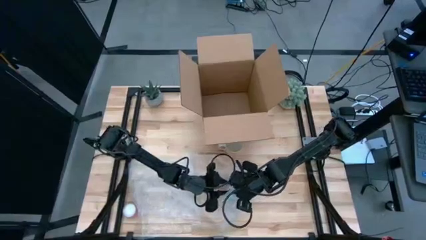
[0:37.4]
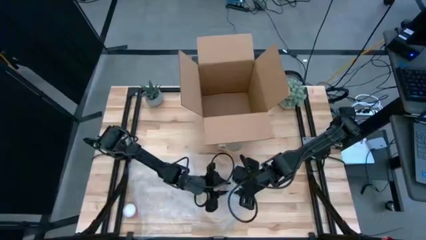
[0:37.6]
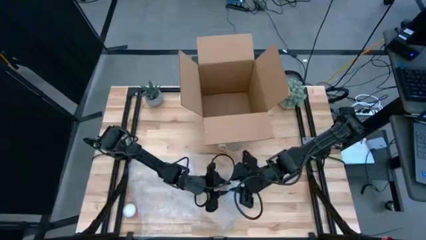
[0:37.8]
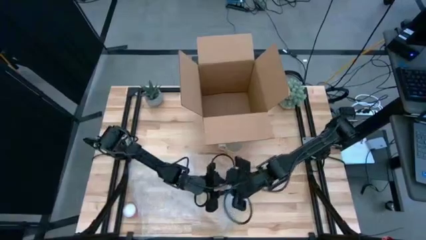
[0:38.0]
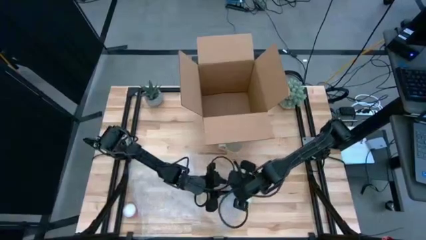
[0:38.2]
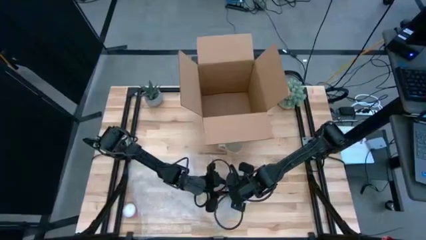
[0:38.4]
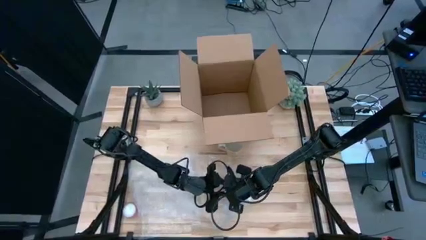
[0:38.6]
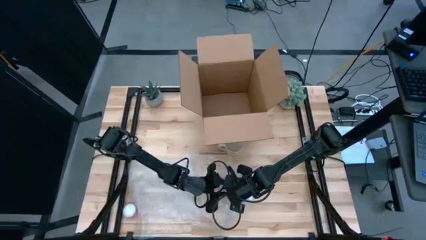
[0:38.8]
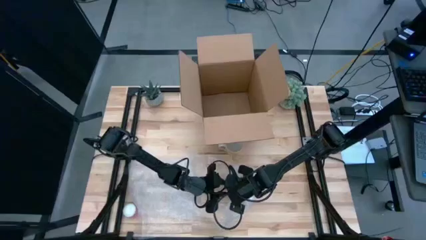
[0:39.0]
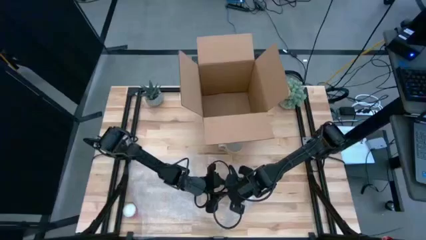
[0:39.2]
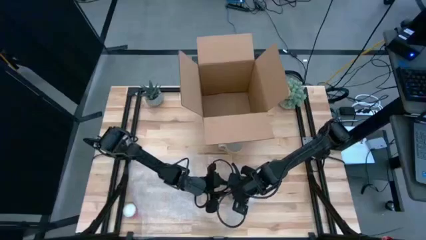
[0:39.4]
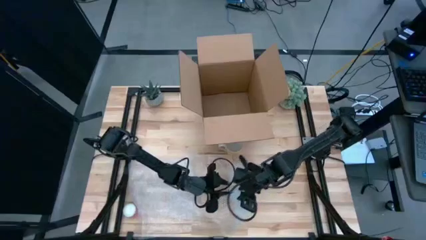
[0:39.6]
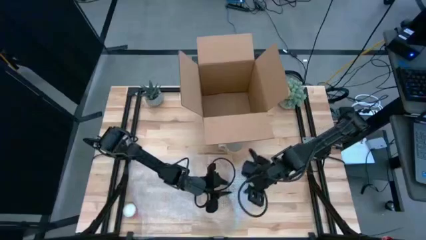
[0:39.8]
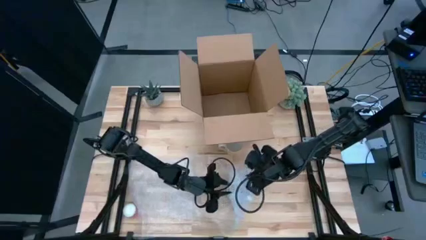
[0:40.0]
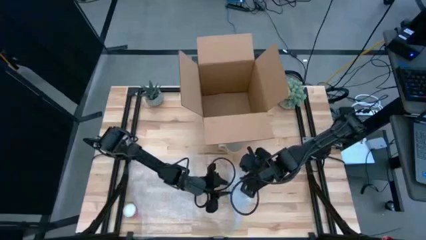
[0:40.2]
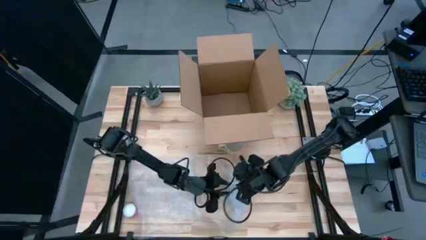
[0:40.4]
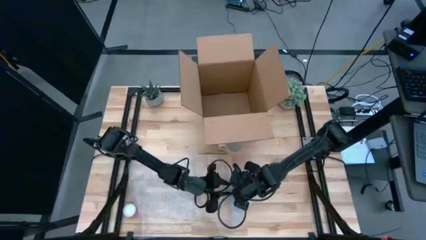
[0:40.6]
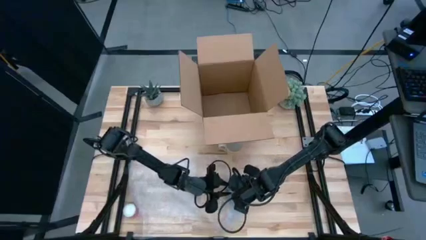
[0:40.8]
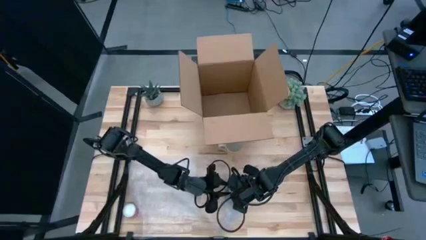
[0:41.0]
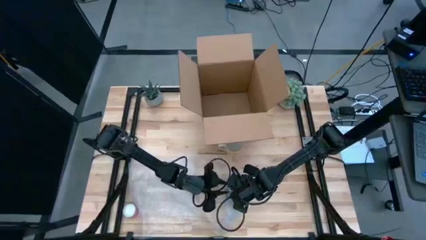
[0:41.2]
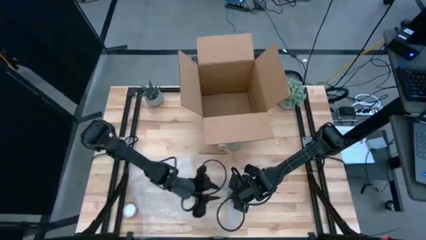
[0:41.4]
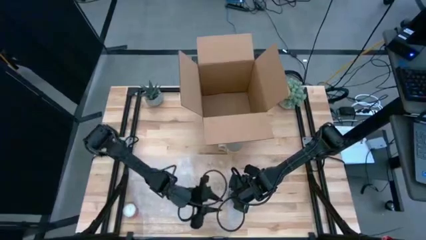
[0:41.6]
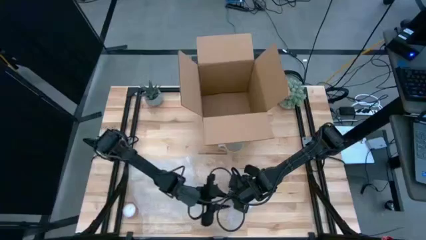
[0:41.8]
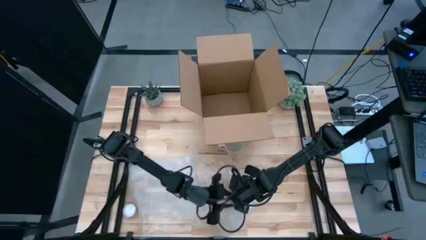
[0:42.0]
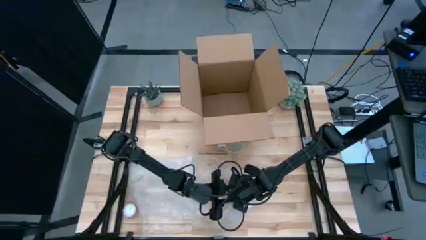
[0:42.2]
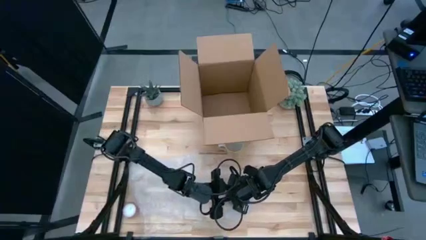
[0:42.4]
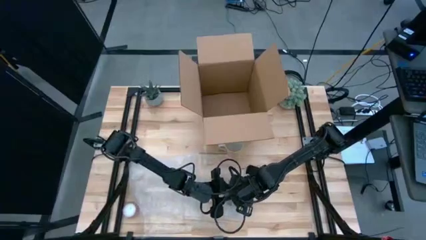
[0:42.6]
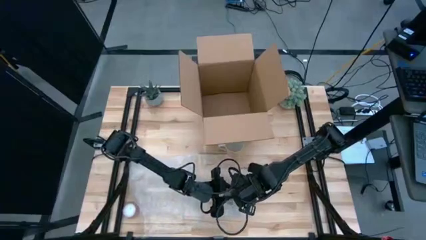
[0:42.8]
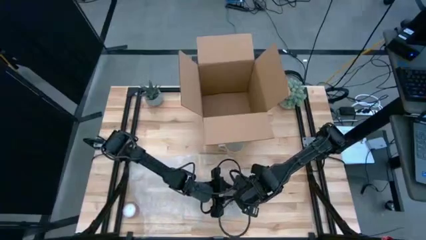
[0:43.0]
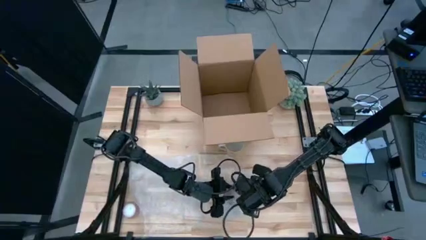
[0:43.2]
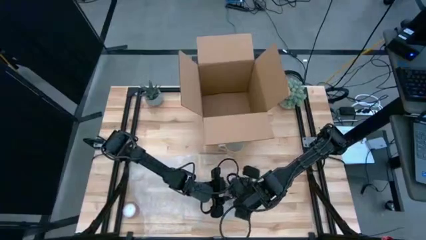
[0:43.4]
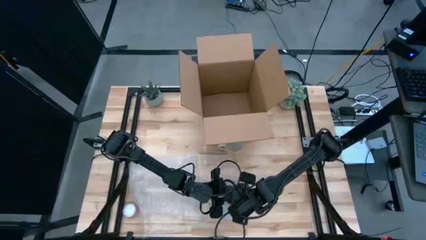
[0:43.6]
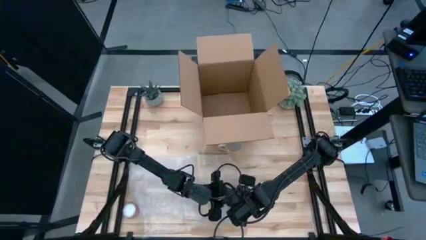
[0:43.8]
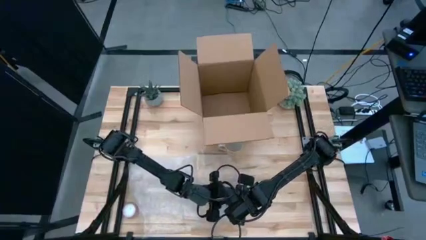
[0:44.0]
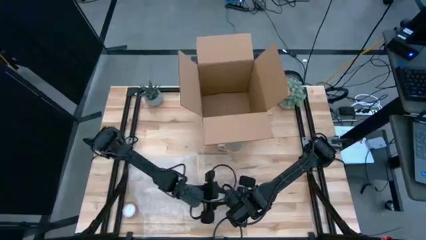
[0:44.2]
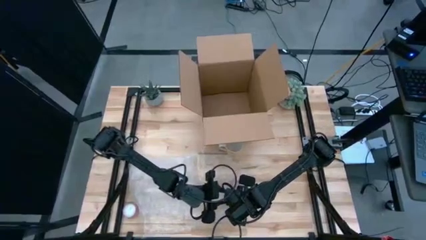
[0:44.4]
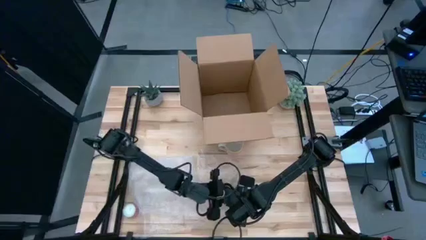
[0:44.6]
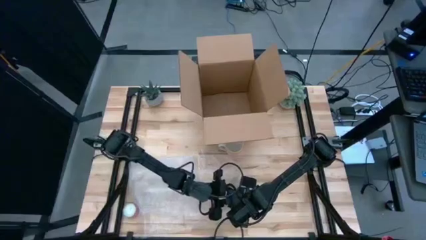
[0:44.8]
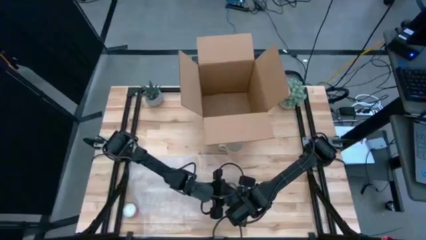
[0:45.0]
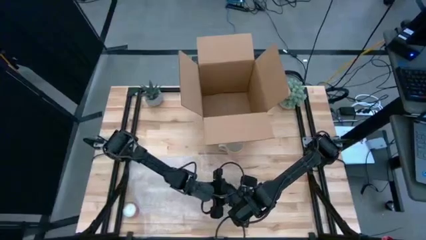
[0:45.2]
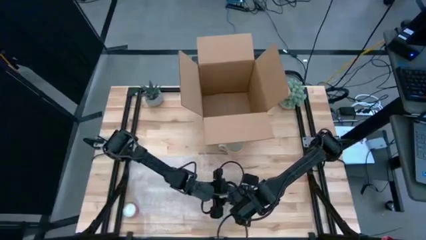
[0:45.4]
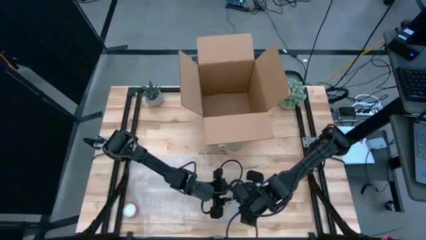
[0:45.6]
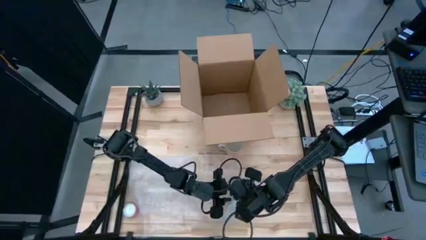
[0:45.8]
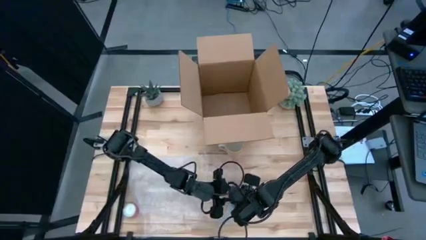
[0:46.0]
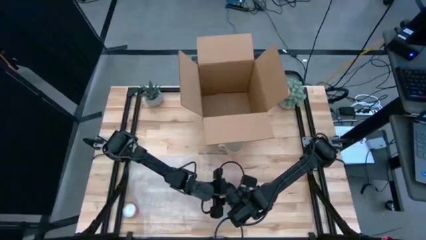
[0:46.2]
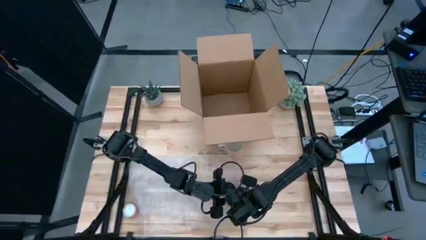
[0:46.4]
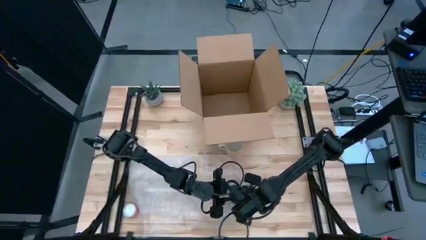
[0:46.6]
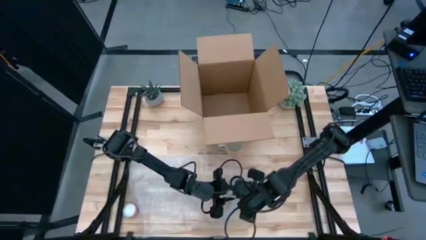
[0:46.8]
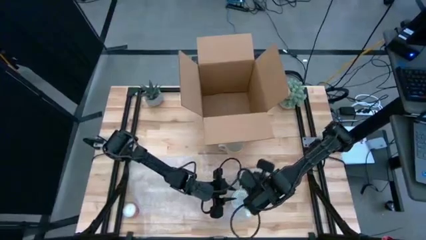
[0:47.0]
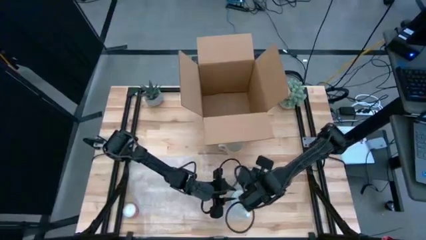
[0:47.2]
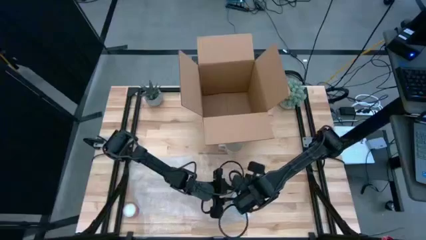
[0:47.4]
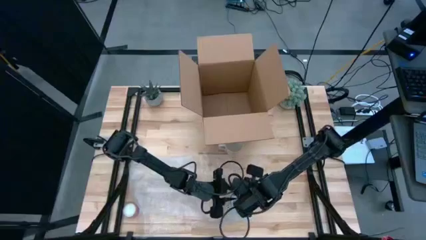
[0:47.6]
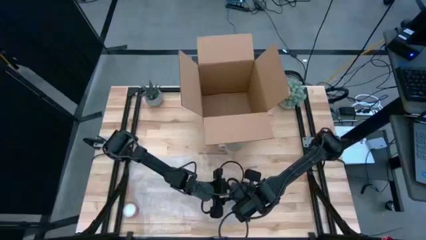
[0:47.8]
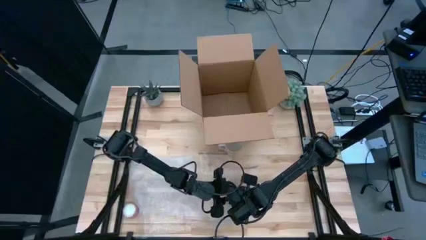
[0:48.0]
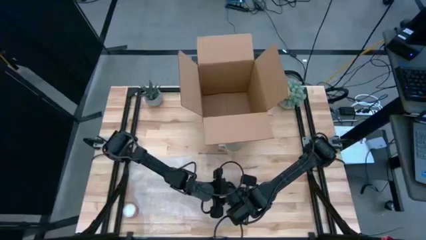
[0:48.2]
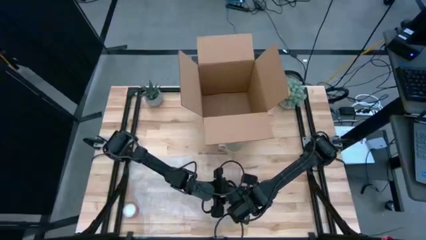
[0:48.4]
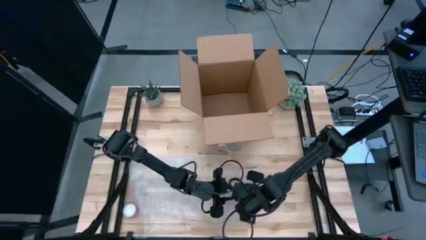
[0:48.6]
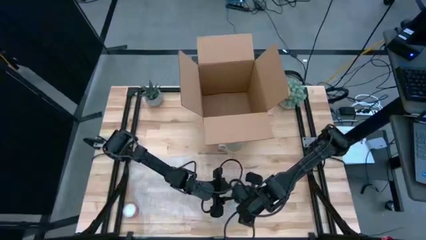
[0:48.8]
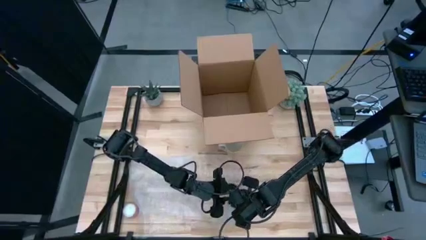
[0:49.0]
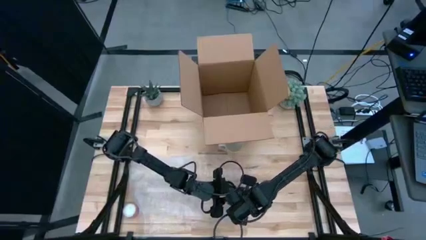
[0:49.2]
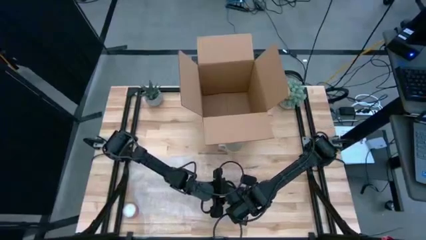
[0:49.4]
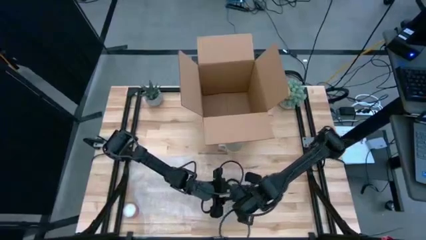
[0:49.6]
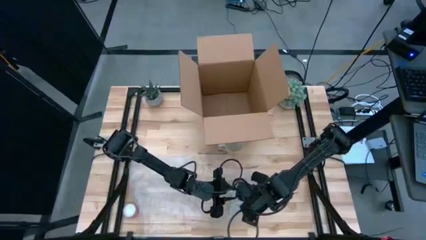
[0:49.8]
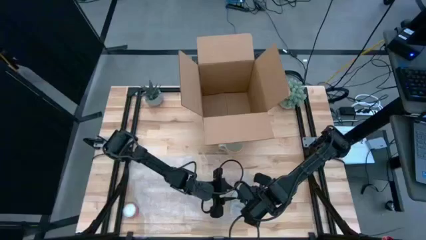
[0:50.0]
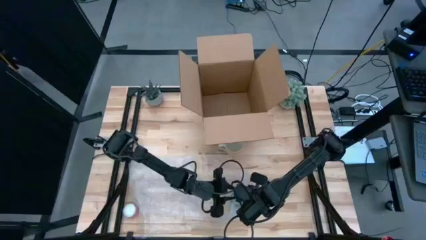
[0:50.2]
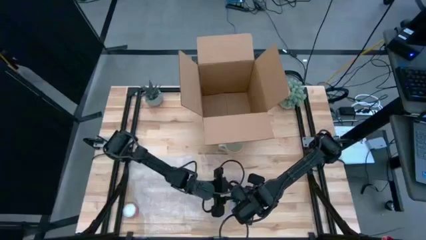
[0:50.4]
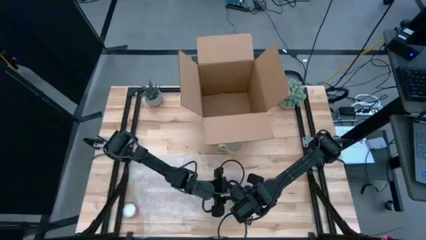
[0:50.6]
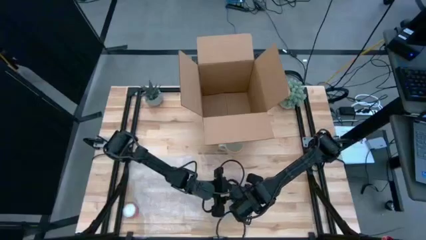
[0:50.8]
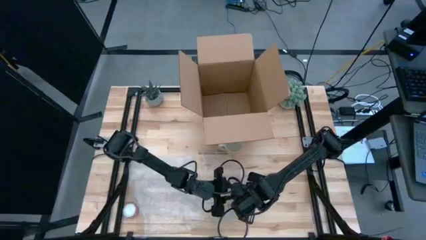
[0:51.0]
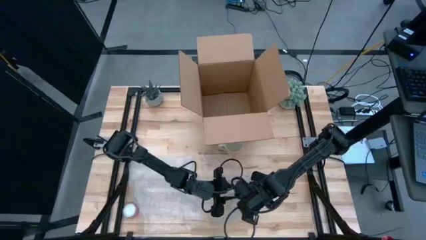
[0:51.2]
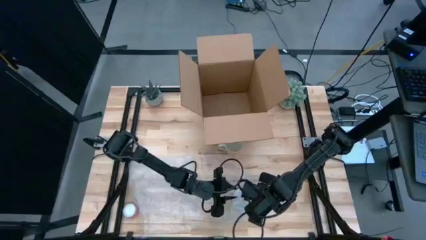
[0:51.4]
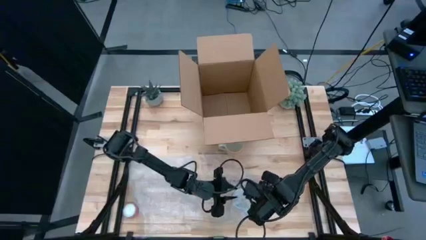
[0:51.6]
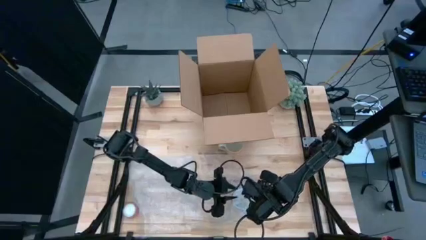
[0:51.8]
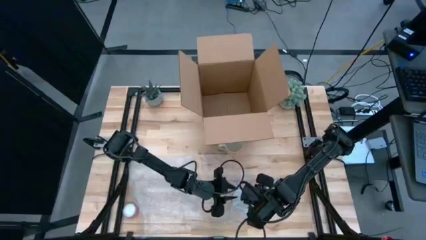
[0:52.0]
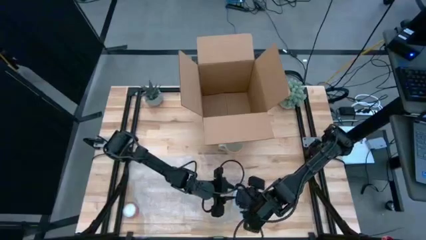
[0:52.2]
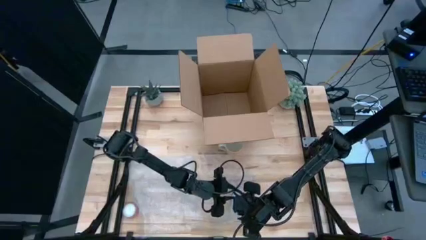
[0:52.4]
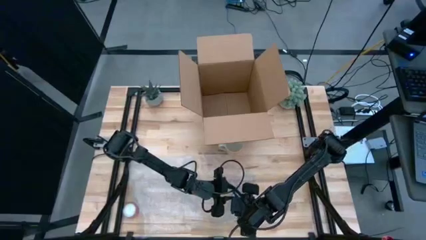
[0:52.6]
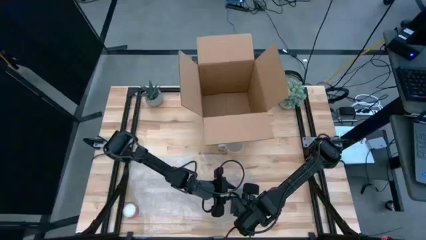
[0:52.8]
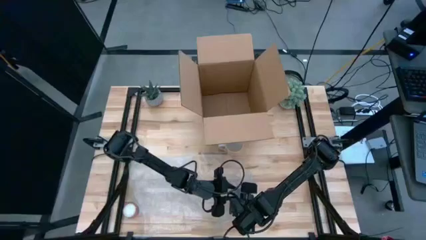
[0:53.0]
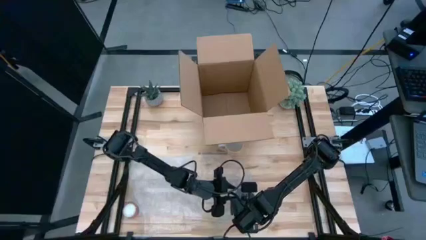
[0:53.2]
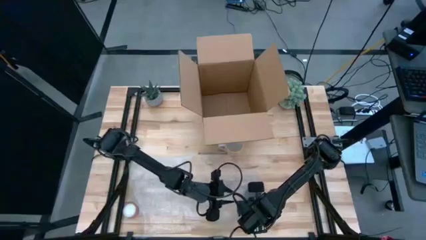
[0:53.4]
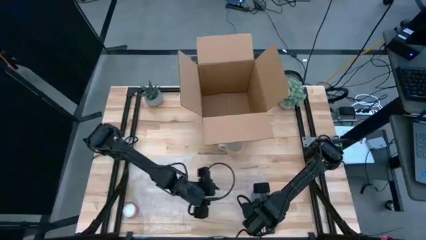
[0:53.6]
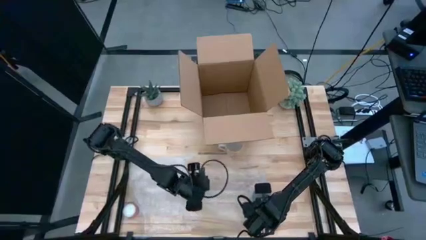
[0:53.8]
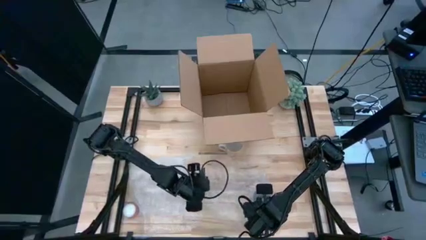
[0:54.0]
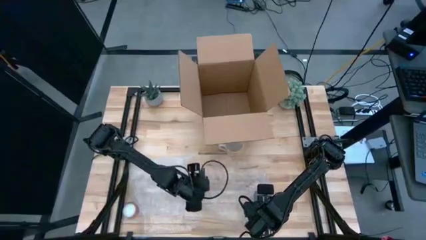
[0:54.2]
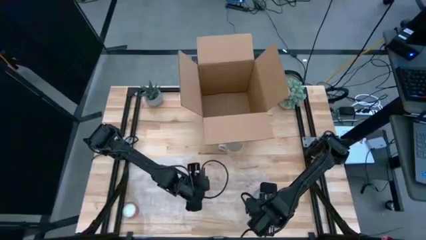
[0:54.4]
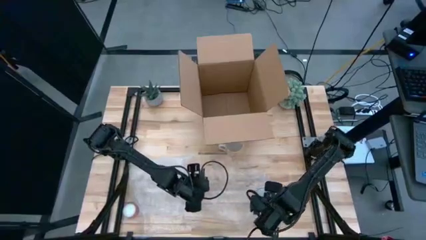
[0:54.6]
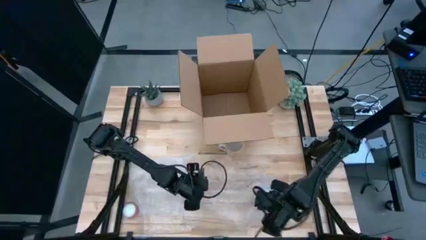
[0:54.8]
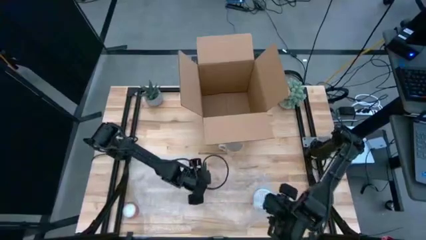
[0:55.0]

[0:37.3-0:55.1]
Task: wrap mug
Wrap the red mug with the right transparent bubble wrap
